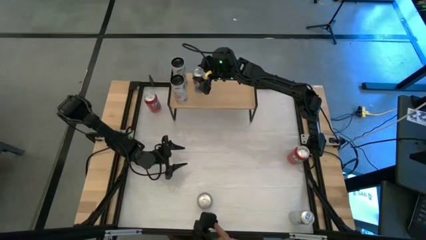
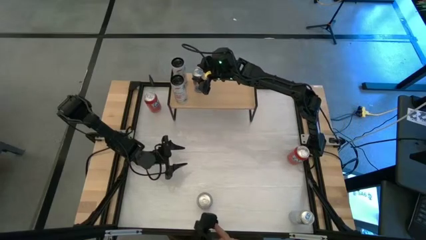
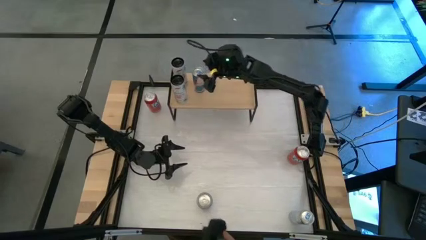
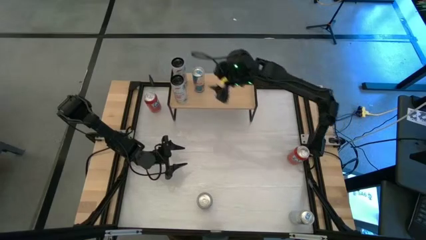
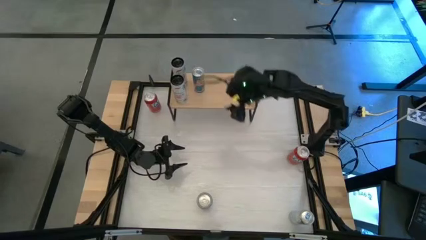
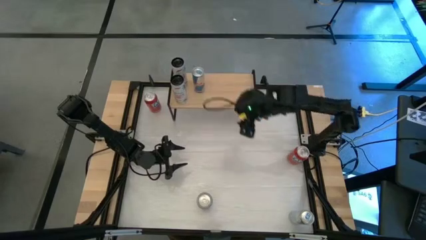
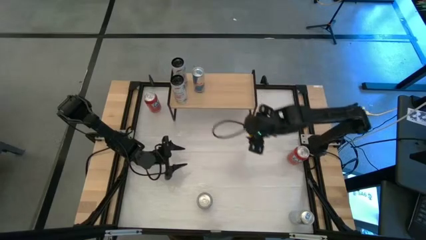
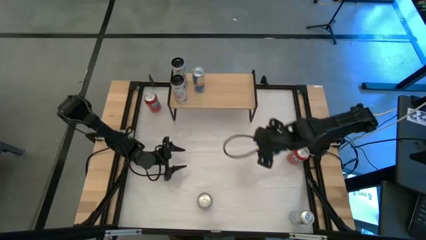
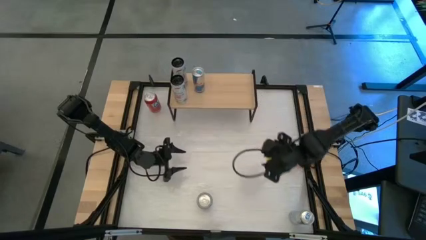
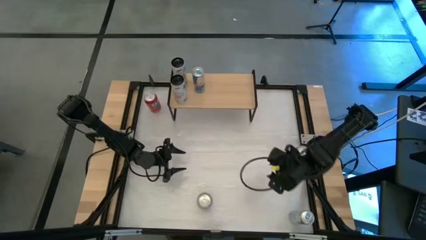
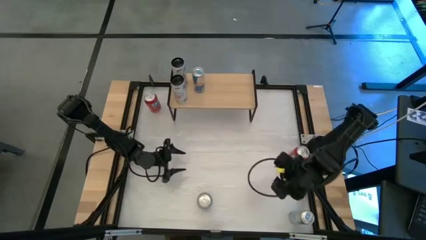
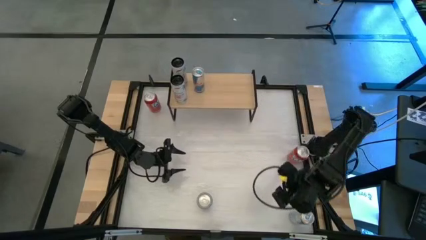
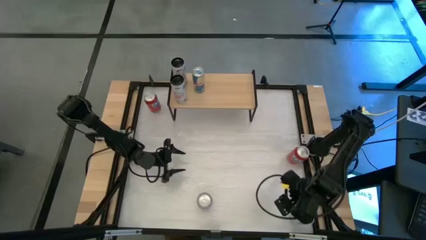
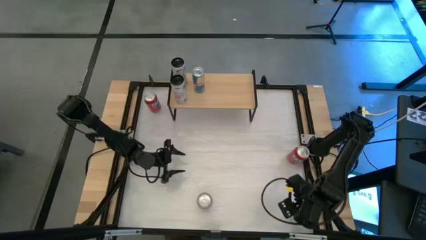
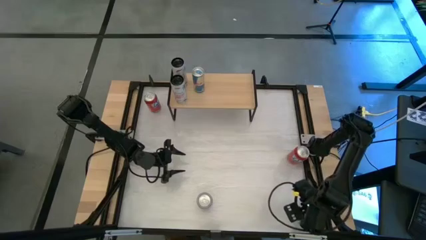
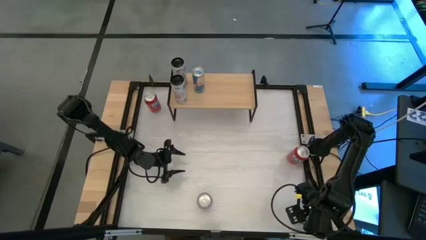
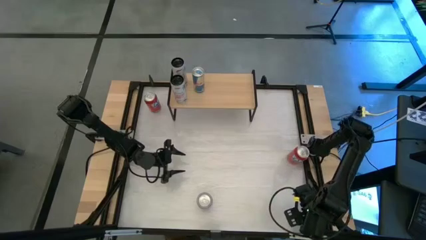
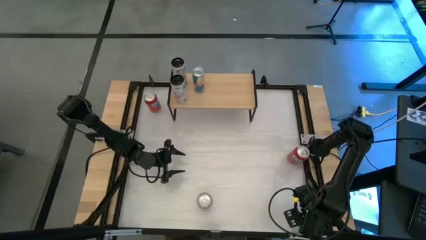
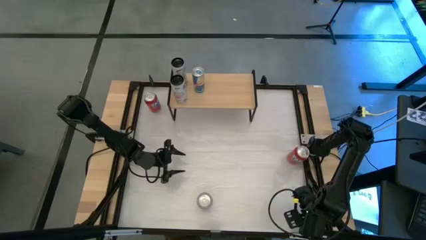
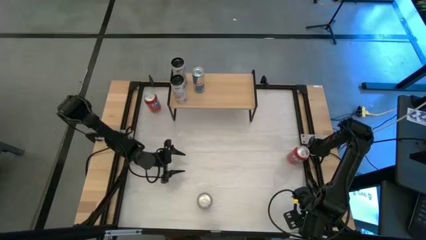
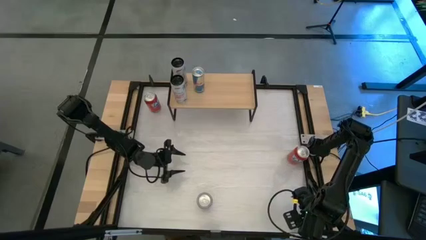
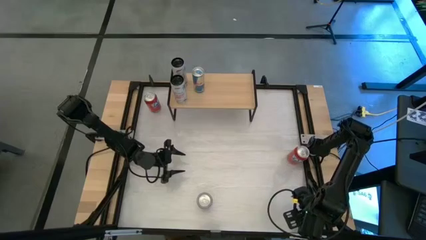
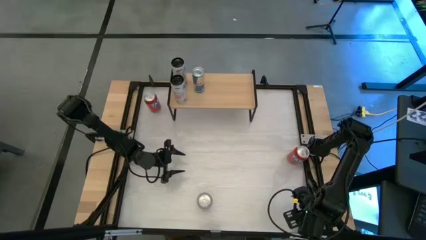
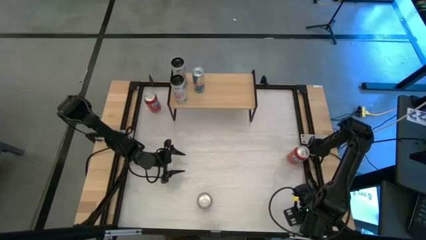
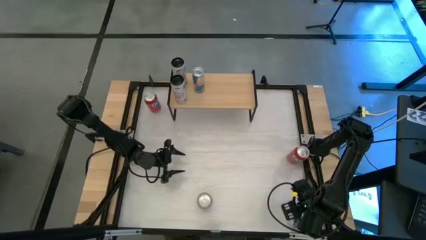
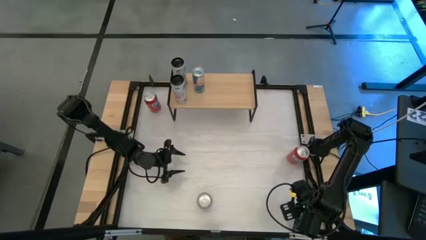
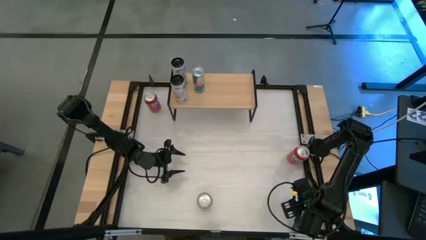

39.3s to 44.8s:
Task: Place canned beverage on shelf
Put the blue soda can on the shelf

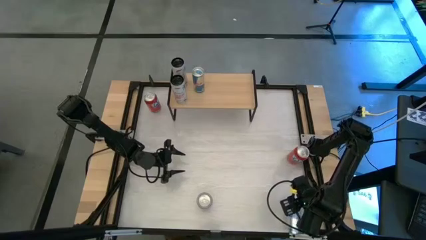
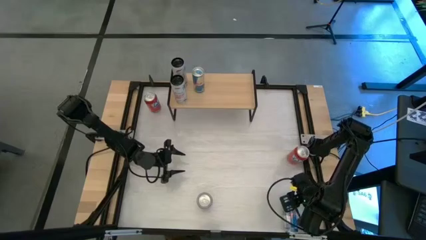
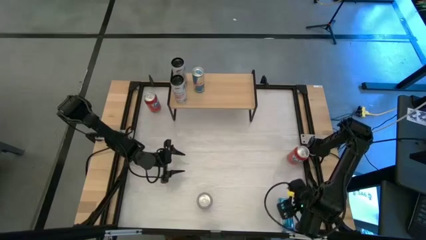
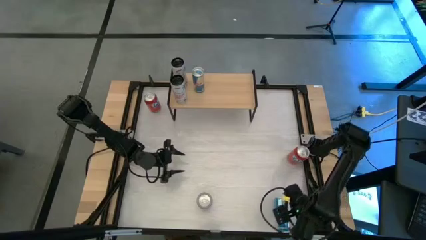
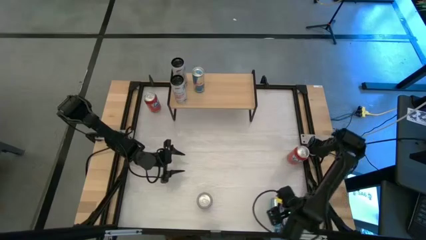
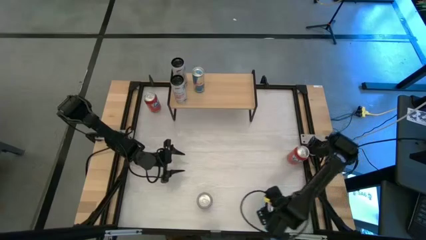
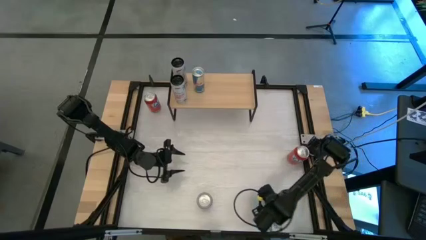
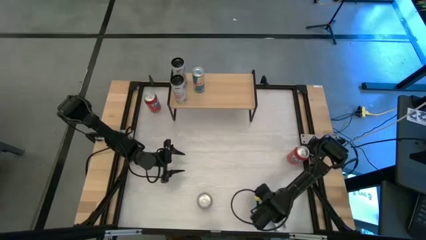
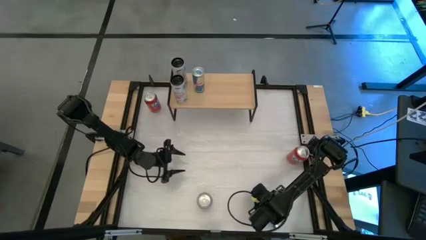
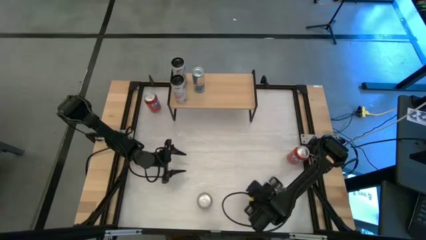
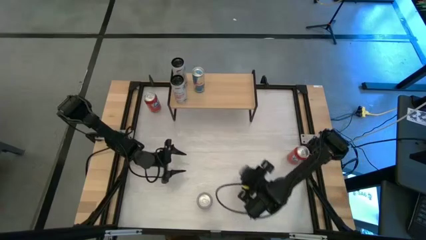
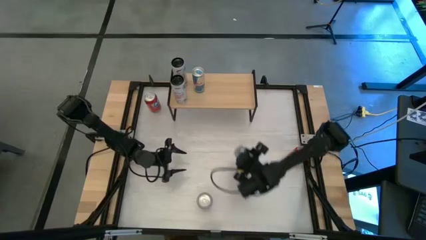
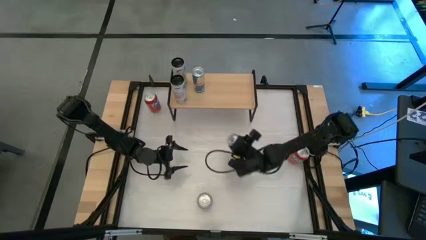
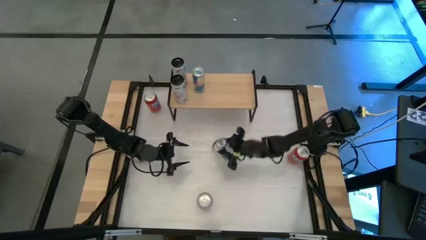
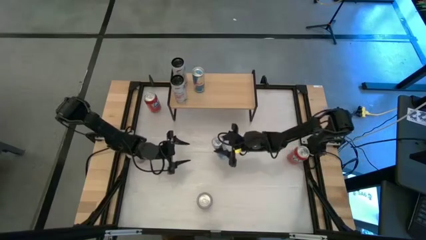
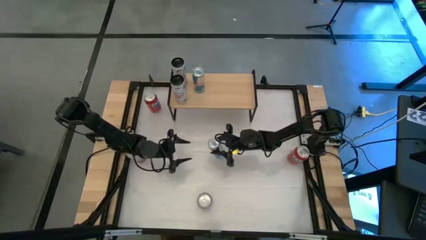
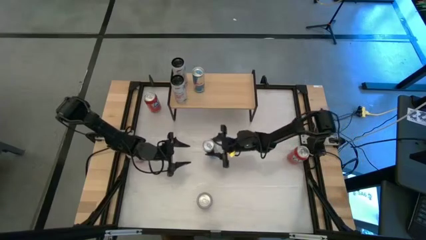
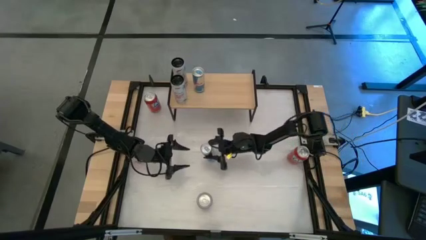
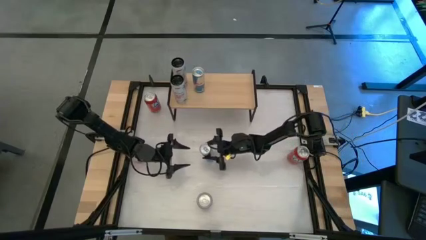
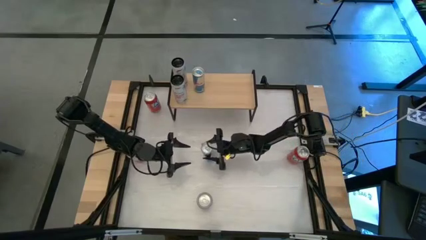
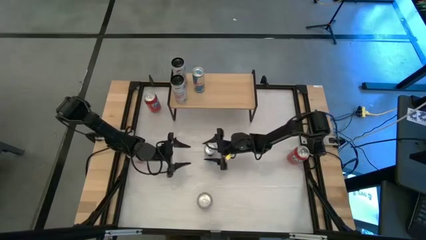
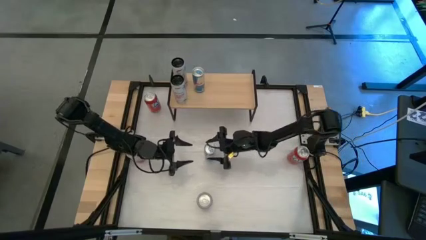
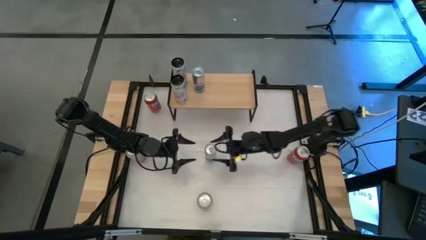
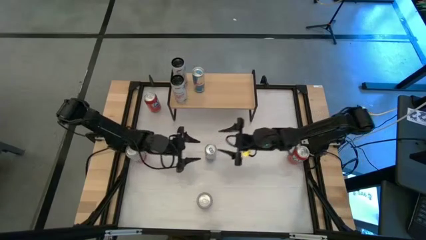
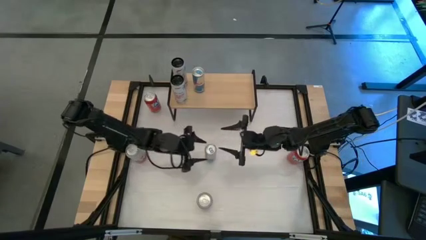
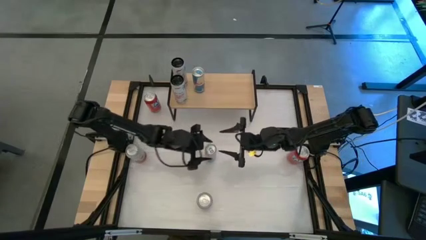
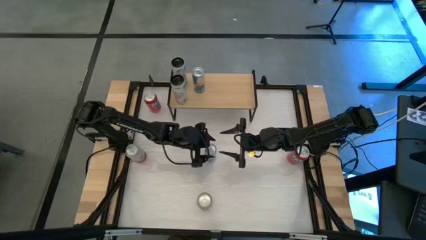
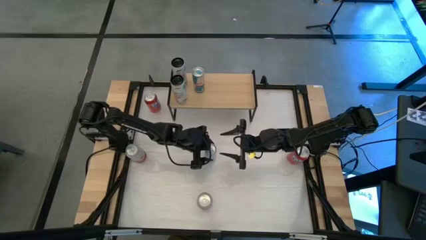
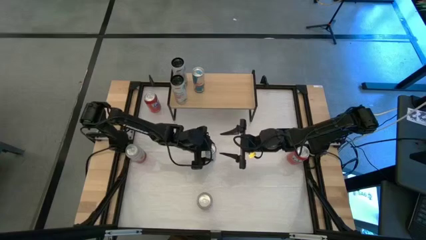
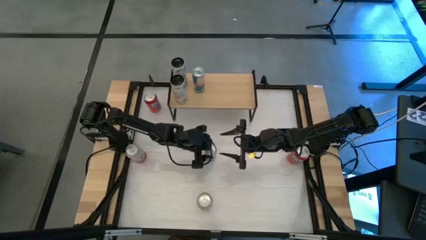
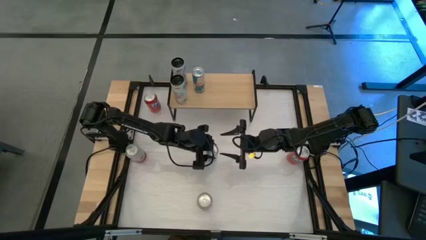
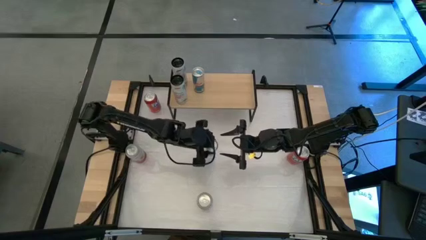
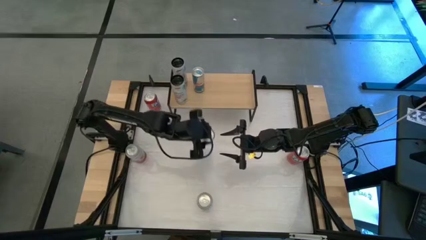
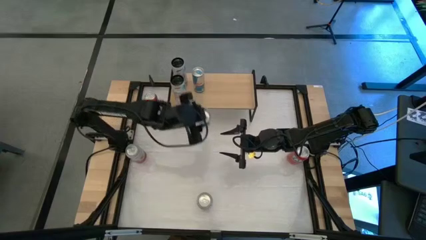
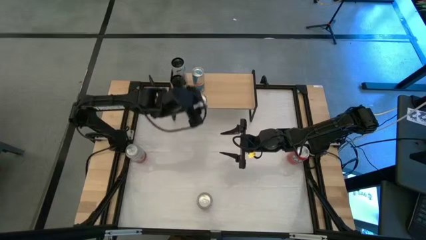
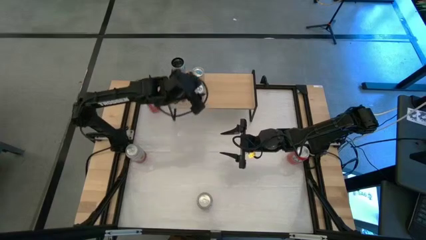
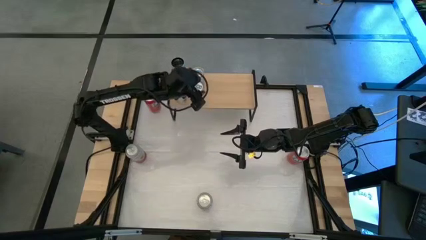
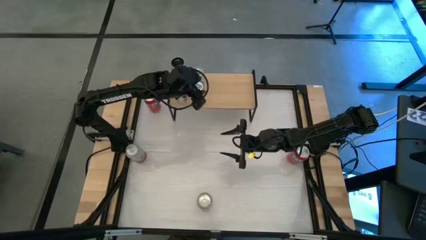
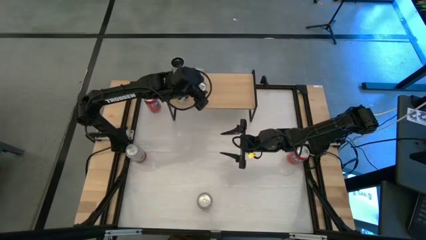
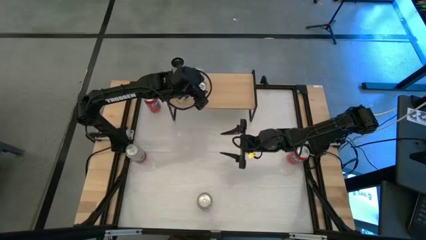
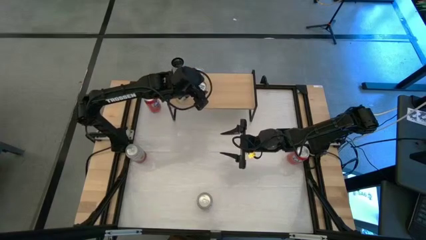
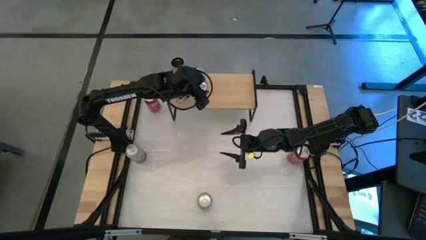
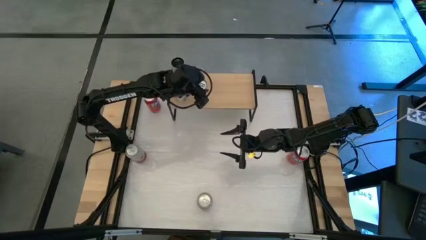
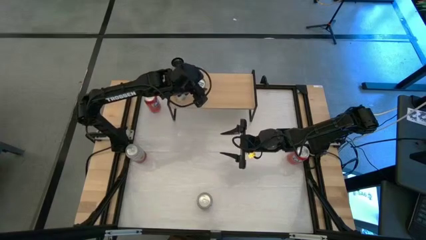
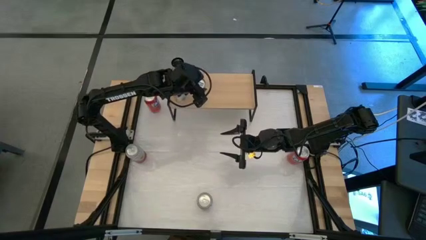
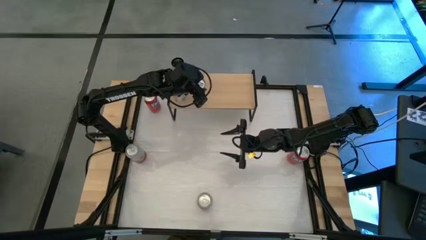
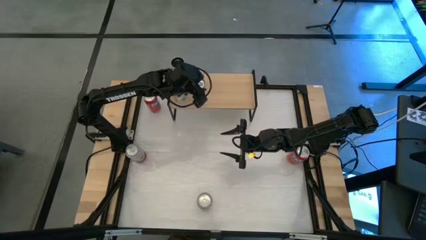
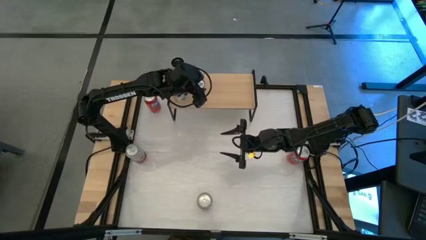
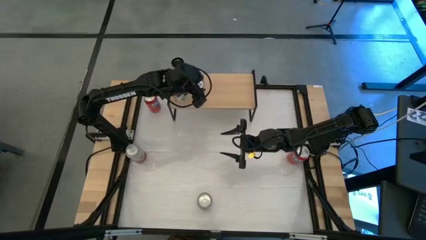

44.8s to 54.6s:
Put the blue soda can on the shelf

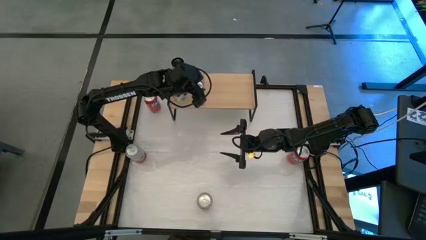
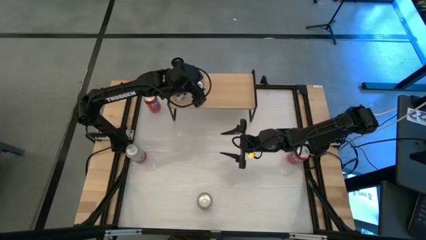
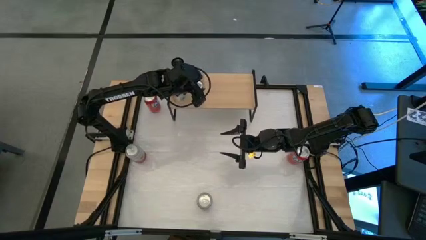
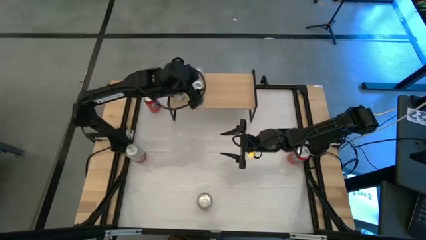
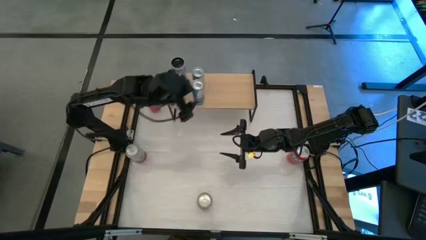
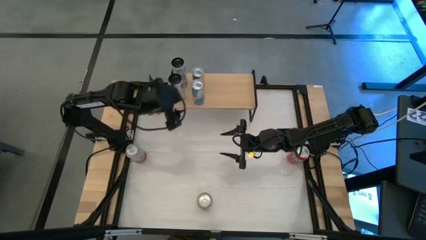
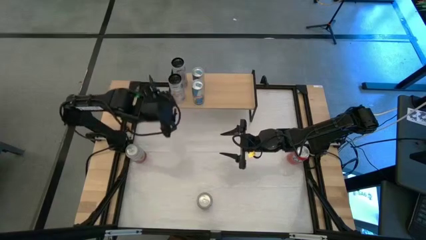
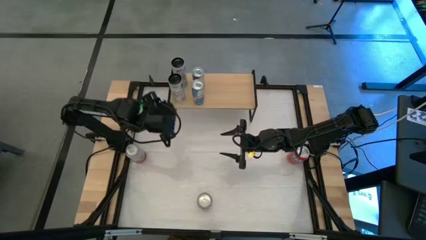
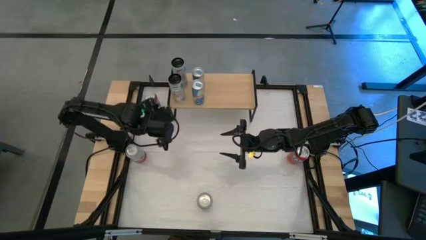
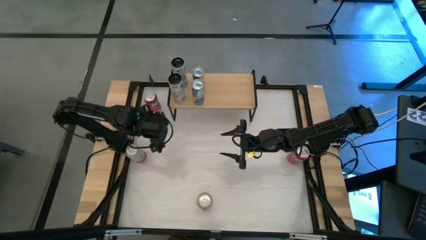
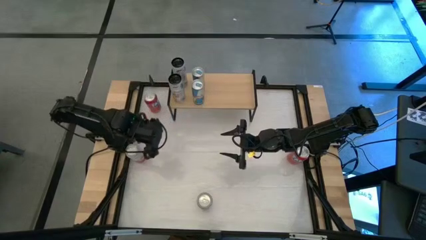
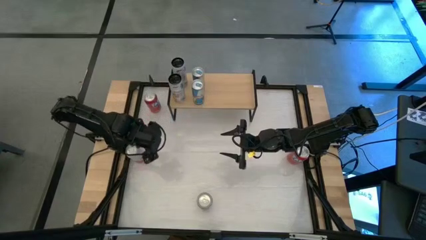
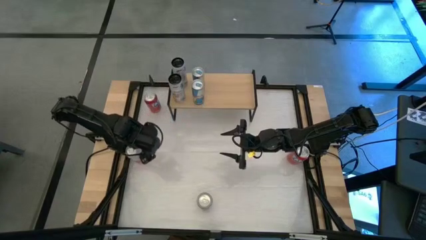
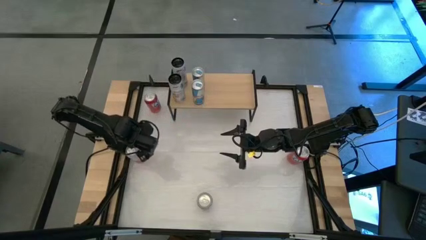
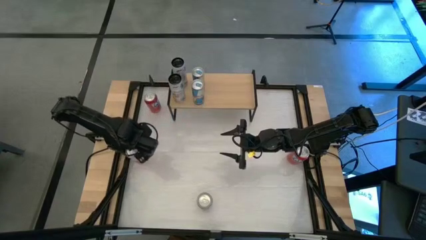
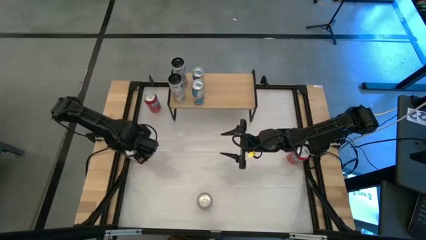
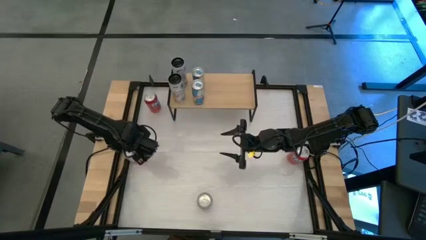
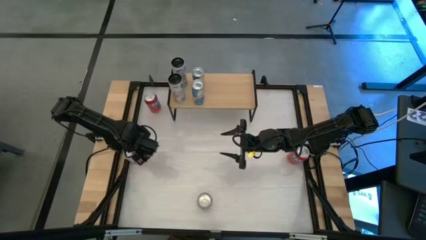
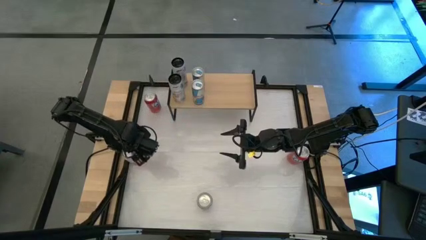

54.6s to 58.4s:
Put the top pink-white soda can on the shelf
